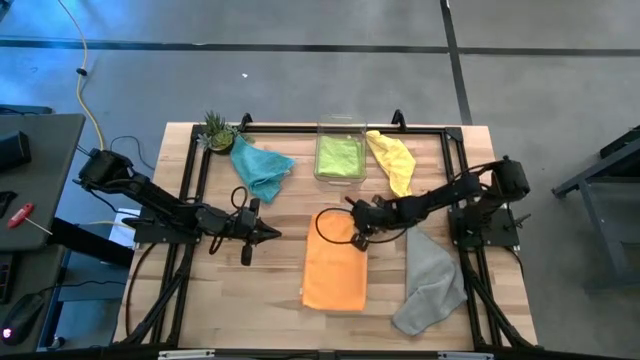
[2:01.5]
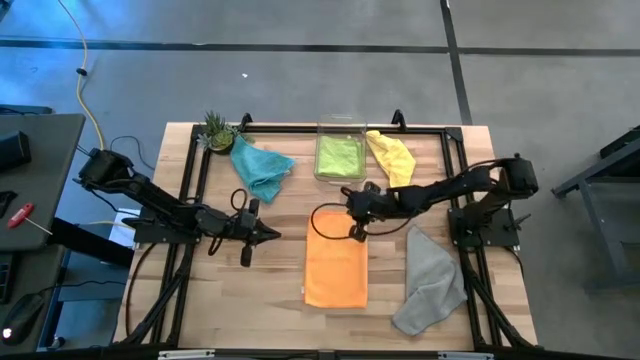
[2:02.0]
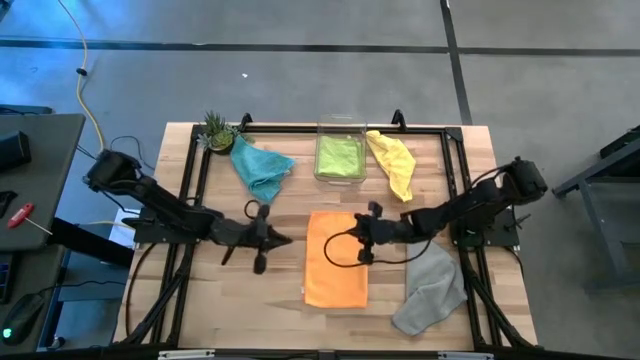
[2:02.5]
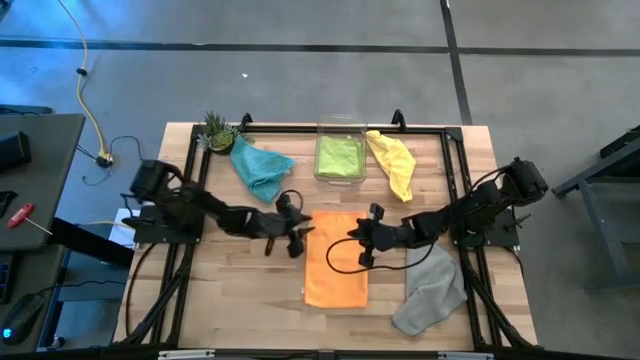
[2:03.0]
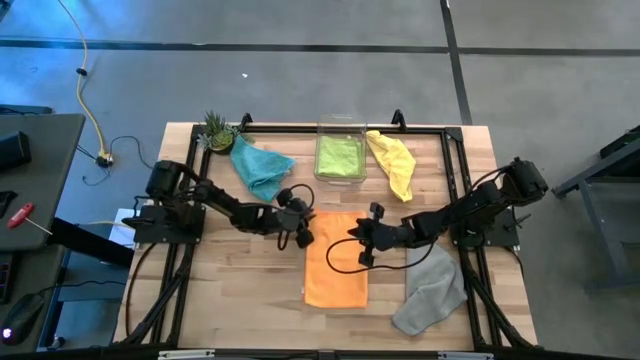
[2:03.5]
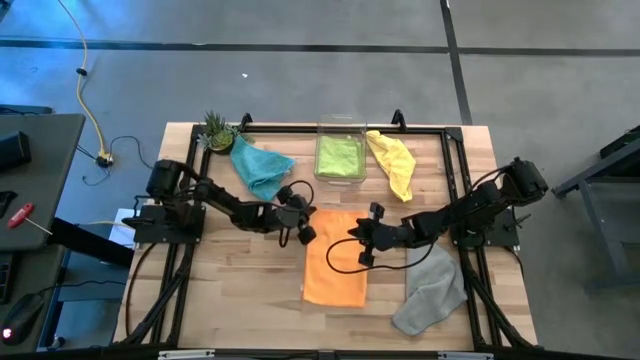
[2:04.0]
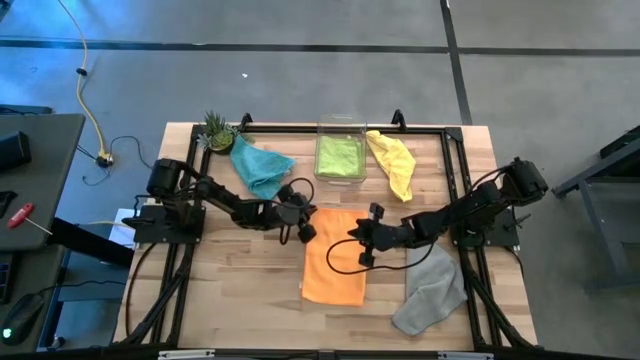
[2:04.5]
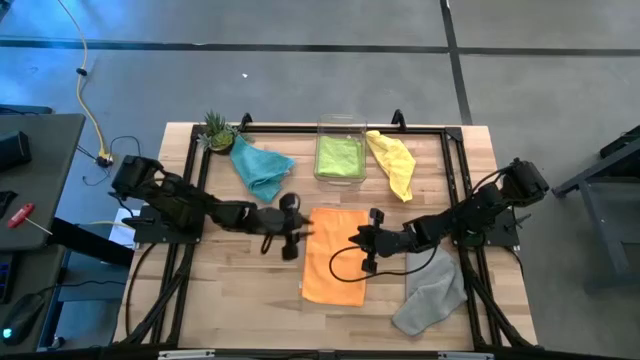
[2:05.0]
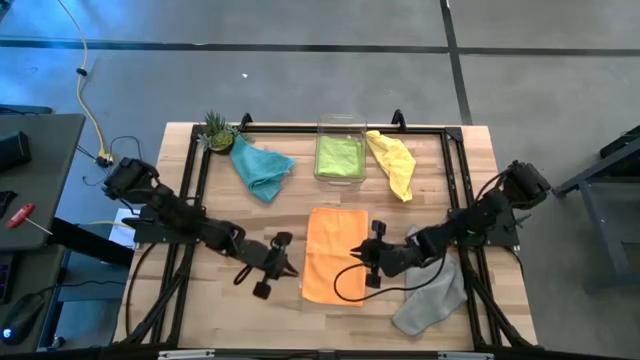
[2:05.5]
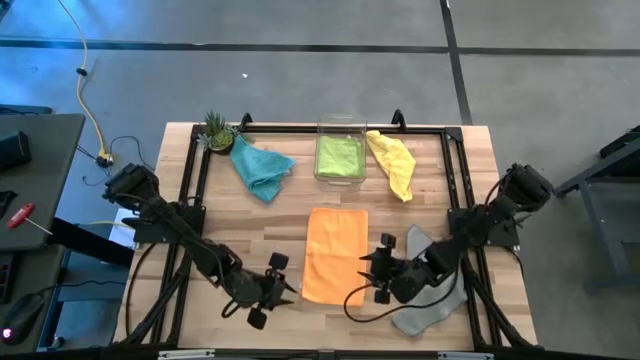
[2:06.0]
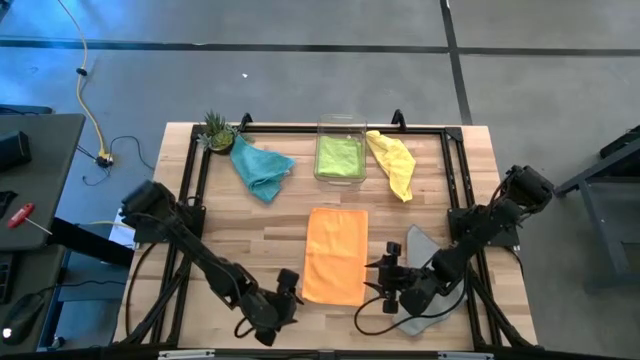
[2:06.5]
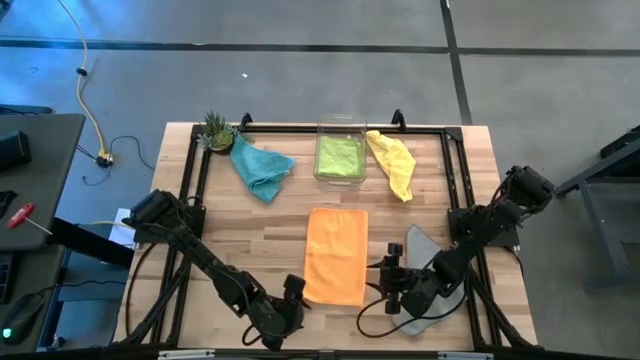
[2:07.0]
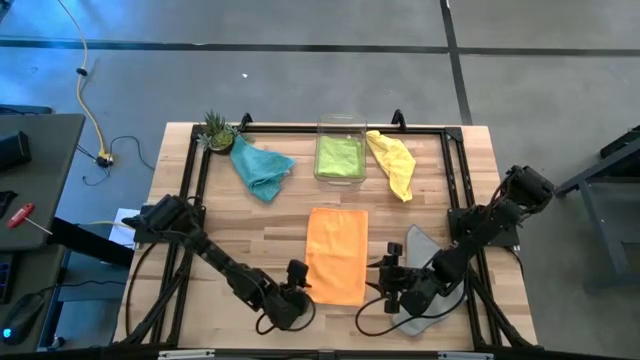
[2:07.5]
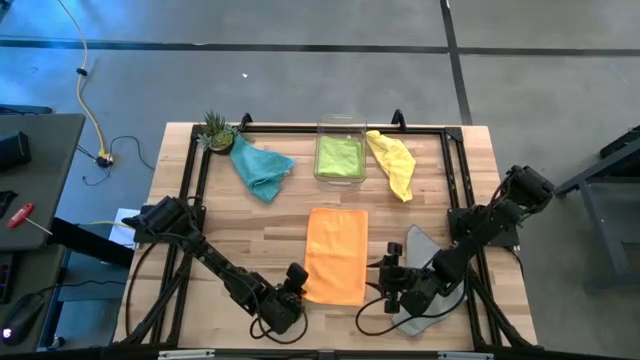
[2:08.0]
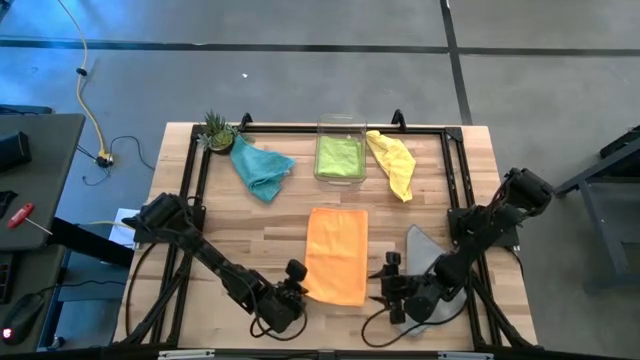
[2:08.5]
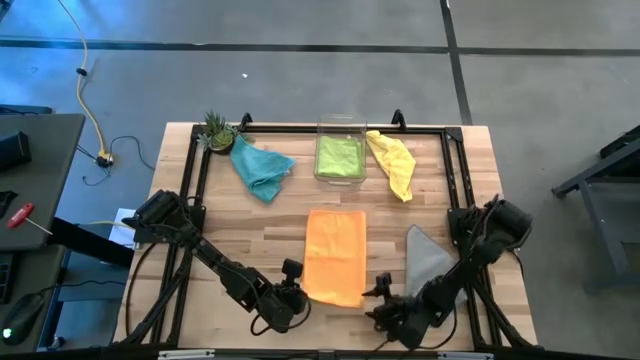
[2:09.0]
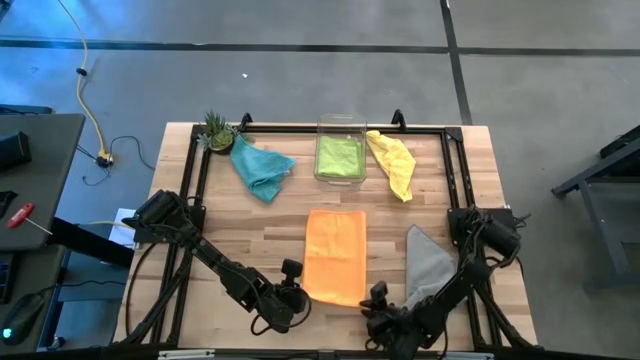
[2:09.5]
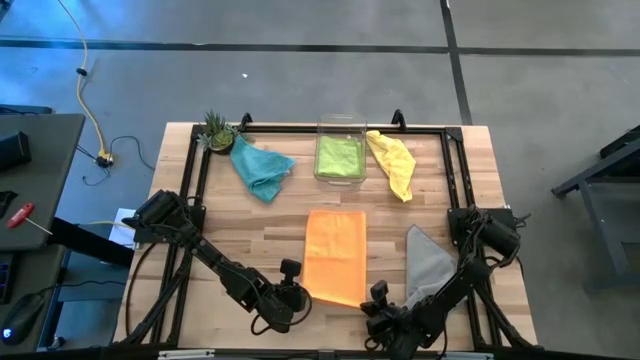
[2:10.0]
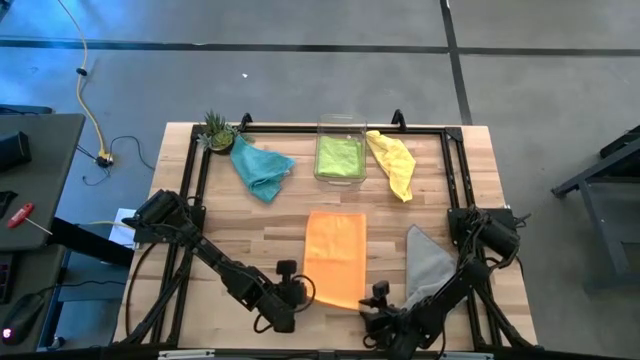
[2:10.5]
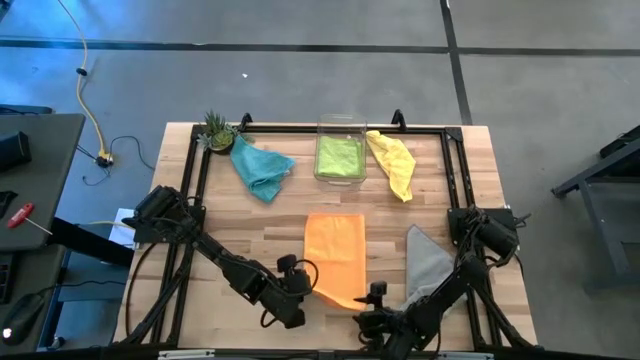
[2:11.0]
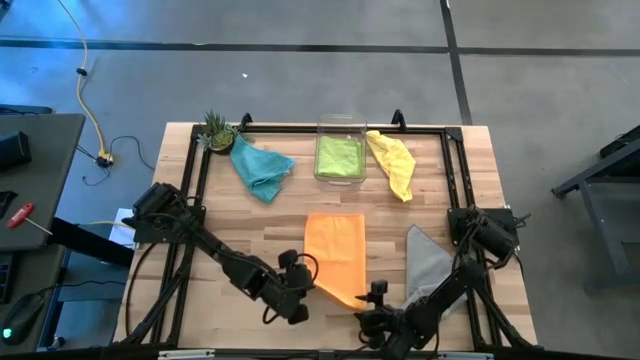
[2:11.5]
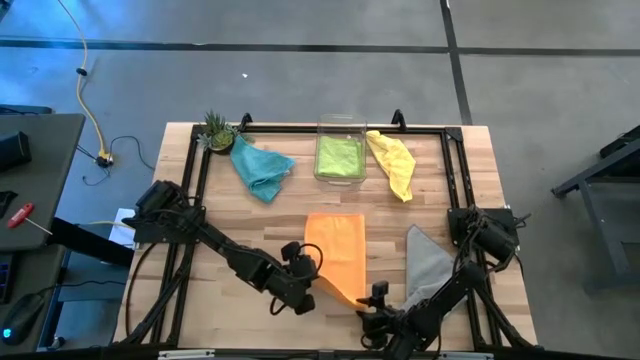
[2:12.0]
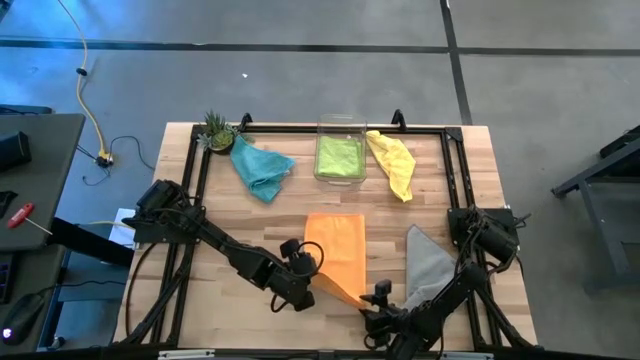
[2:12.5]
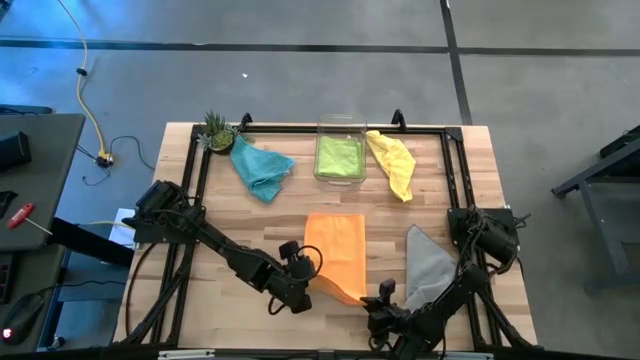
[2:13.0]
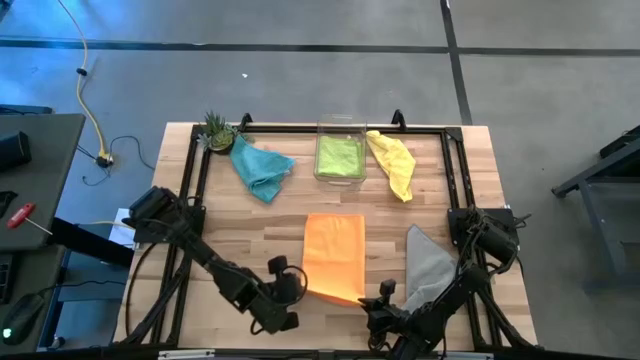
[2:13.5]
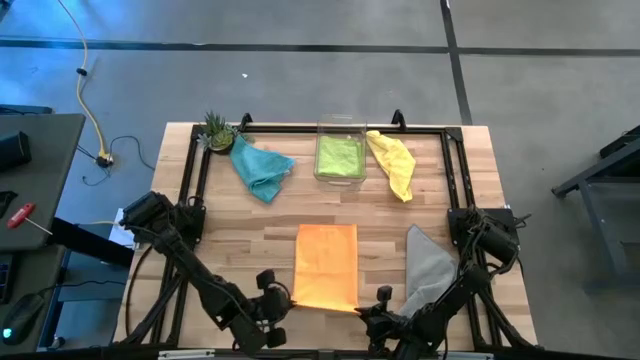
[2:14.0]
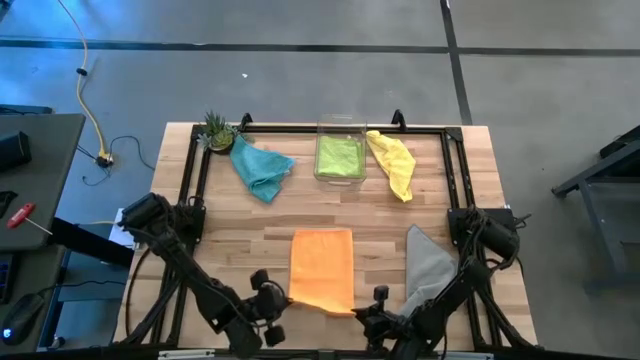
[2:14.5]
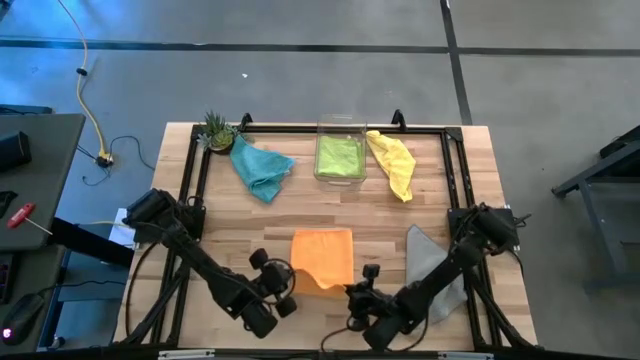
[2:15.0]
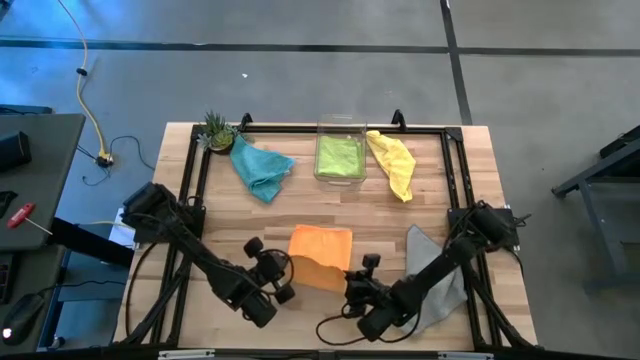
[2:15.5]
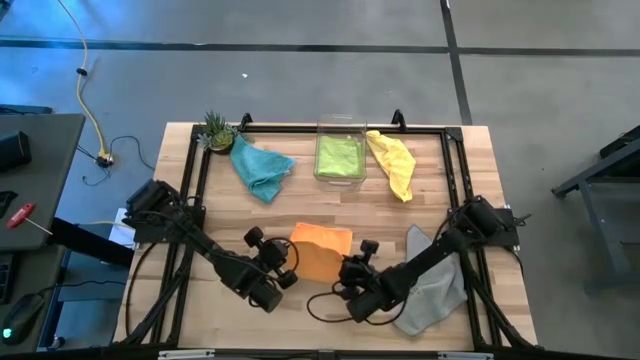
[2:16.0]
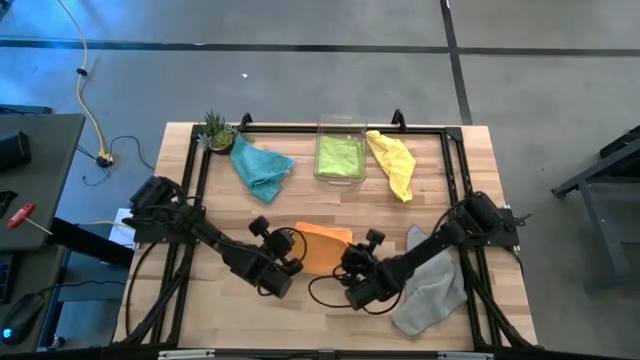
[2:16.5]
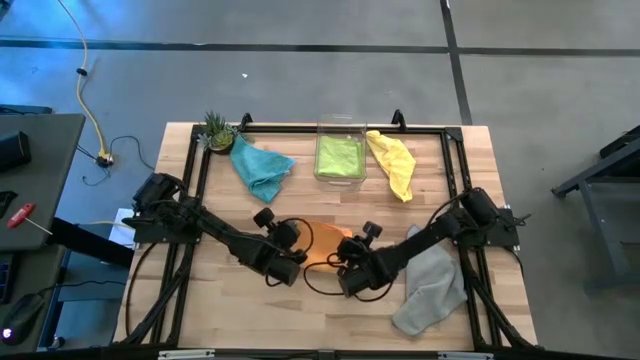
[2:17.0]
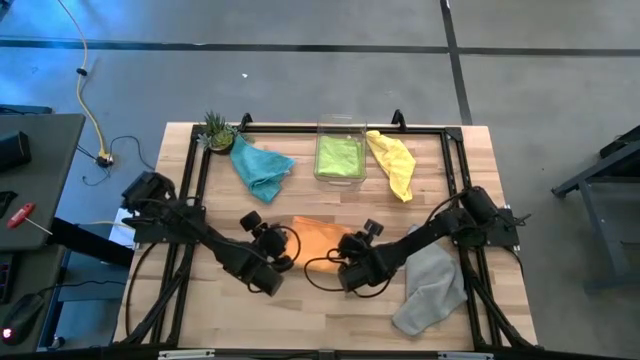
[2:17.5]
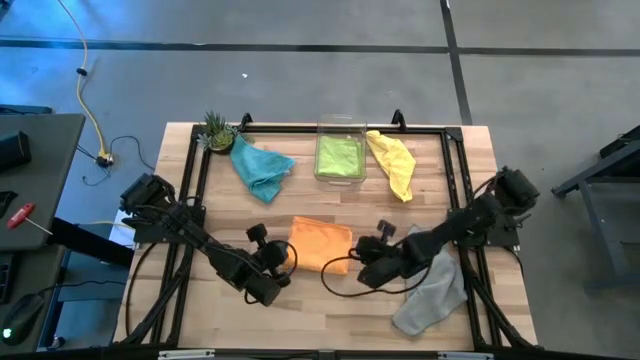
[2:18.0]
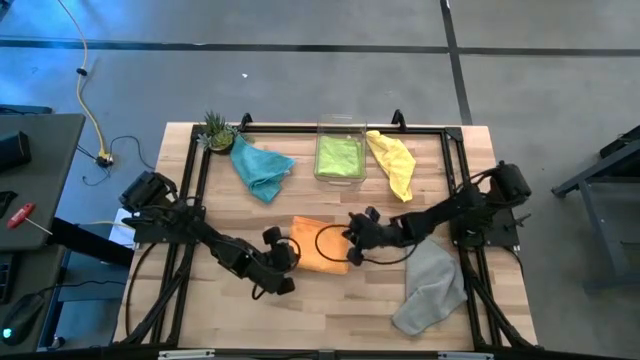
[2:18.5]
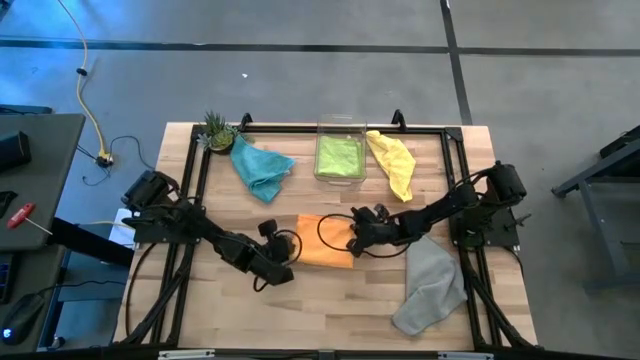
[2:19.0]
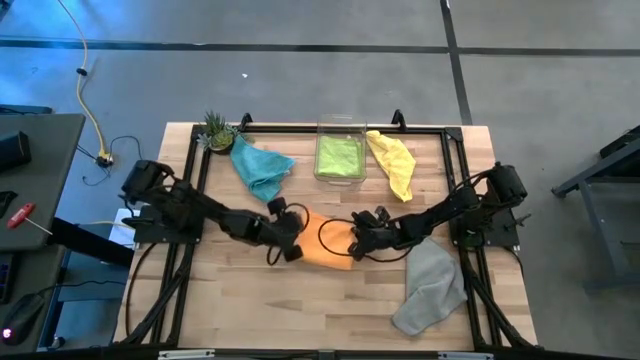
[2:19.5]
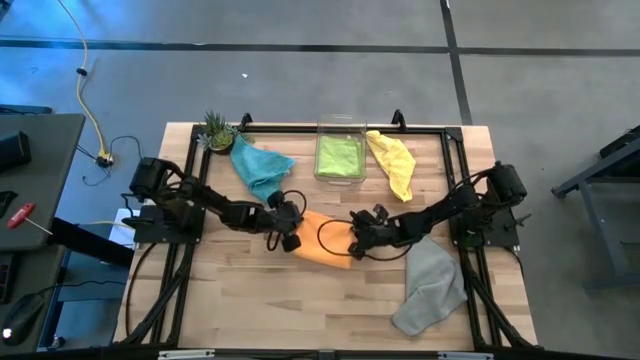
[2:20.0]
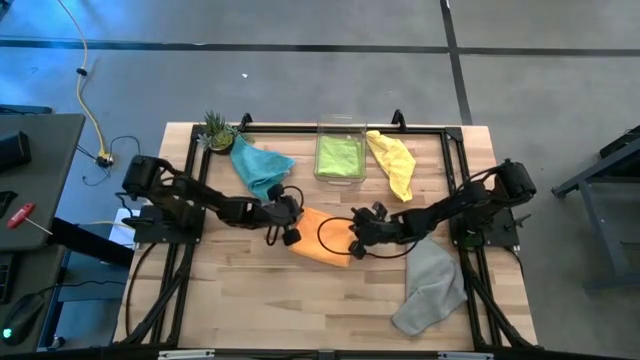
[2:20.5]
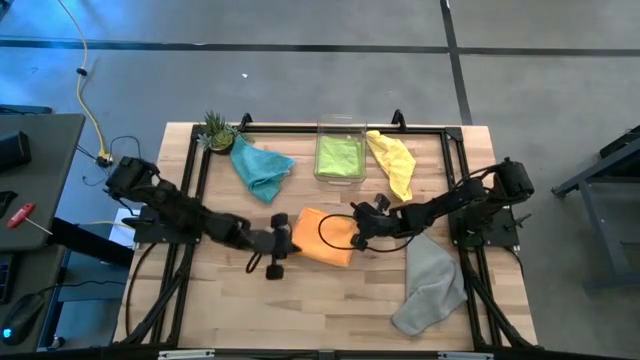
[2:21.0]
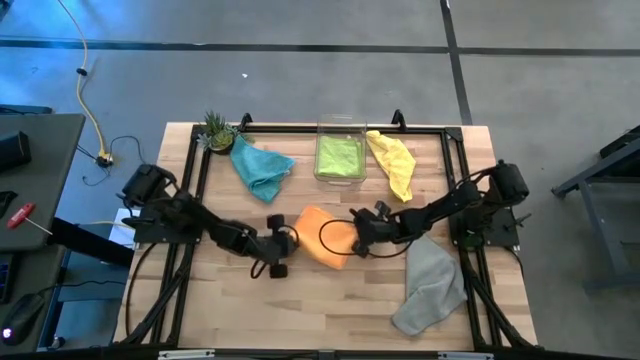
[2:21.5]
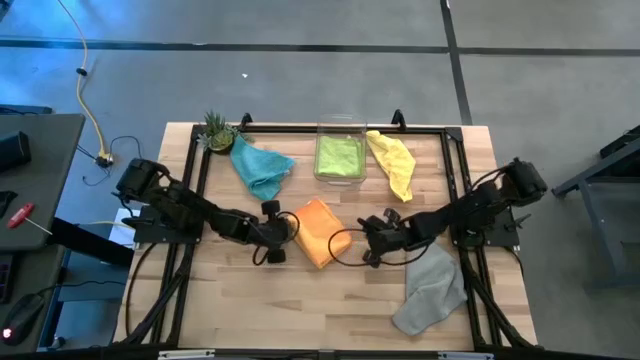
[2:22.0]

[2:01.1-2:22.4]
Task: Fold microfiber towels
Fold the orange microfiber cloth
